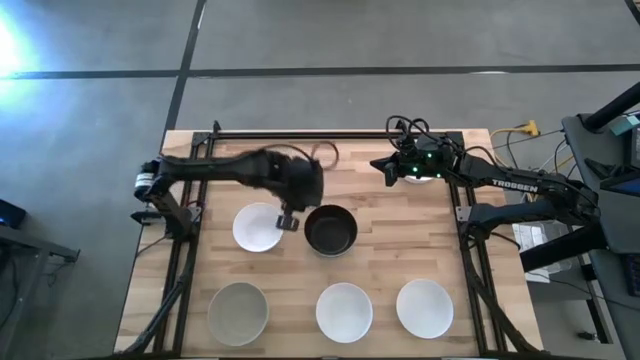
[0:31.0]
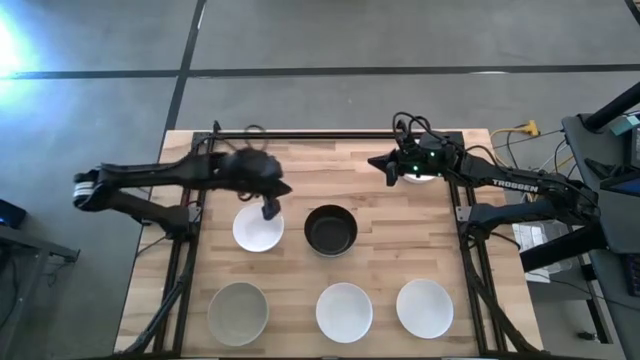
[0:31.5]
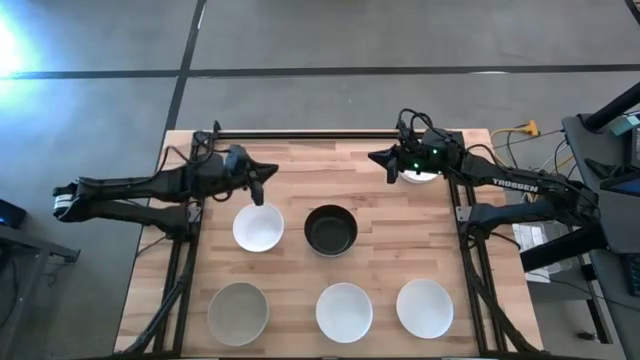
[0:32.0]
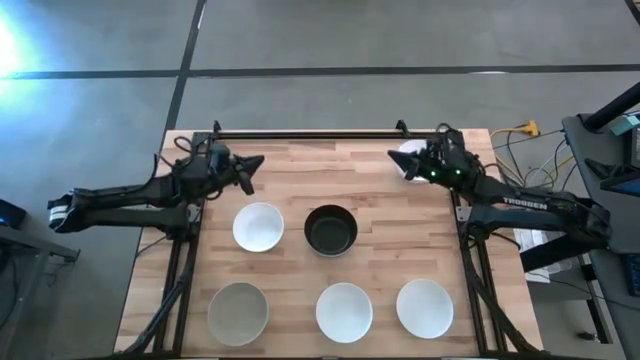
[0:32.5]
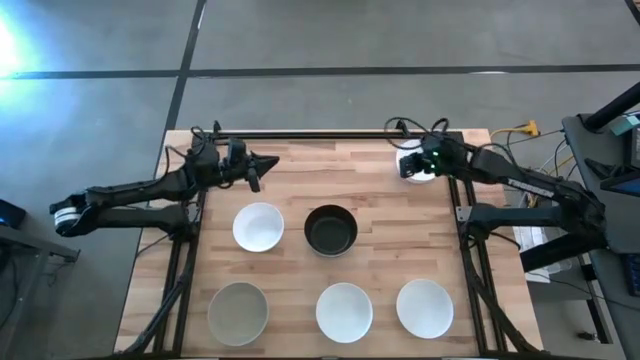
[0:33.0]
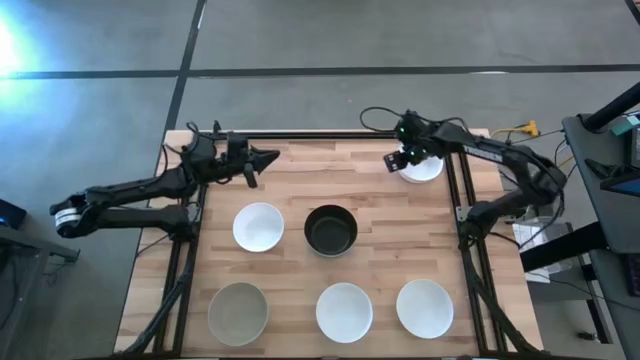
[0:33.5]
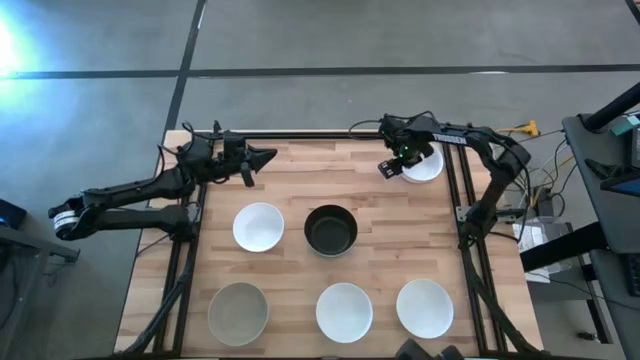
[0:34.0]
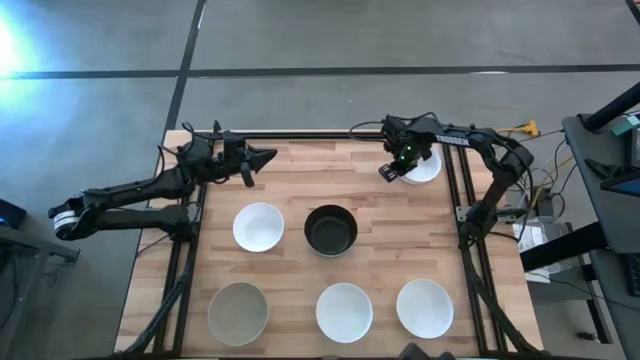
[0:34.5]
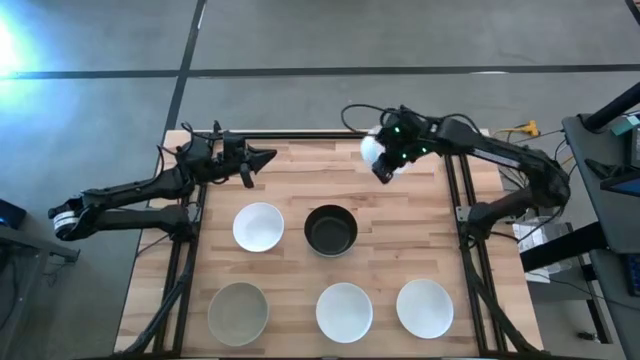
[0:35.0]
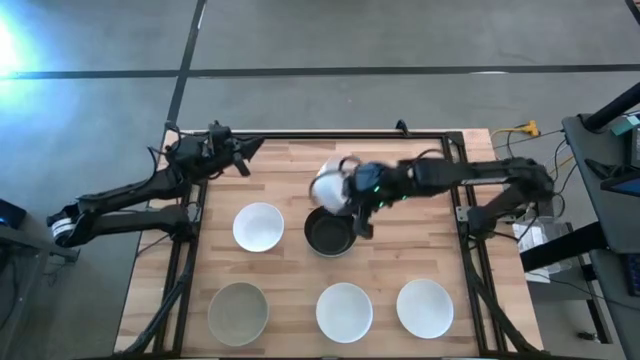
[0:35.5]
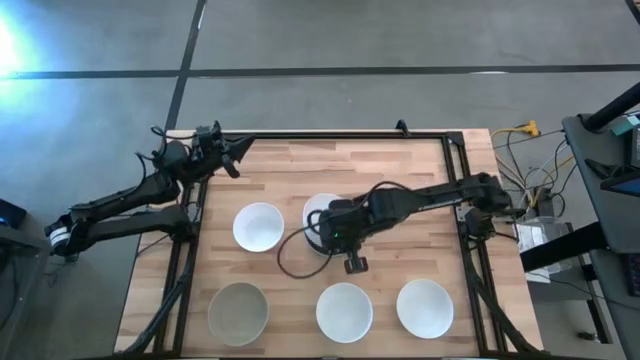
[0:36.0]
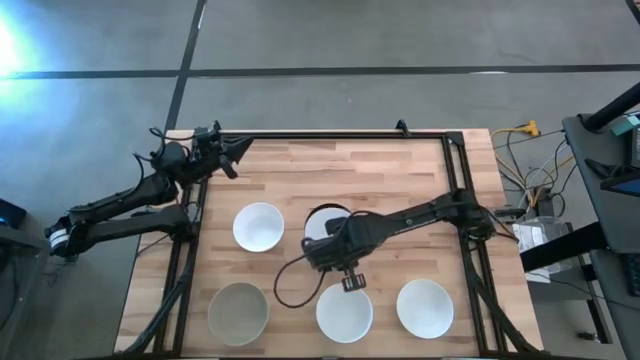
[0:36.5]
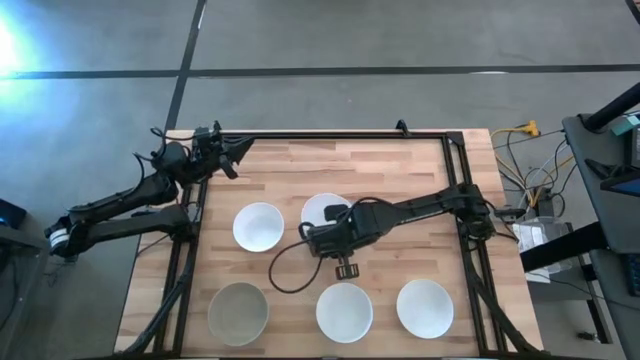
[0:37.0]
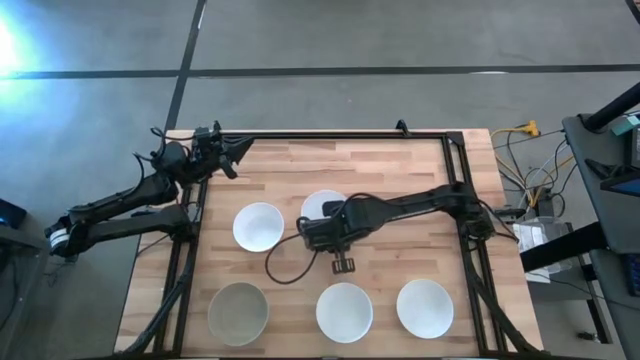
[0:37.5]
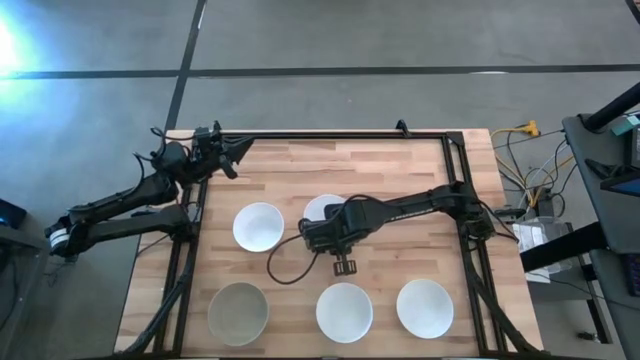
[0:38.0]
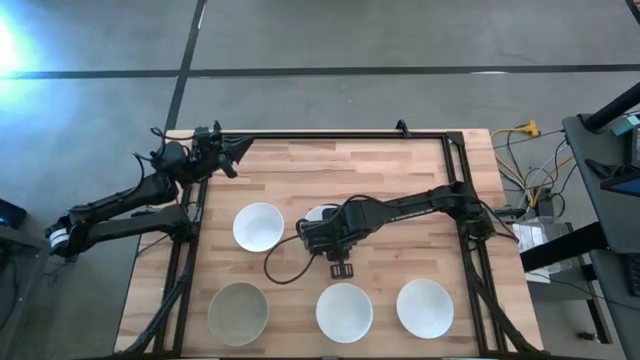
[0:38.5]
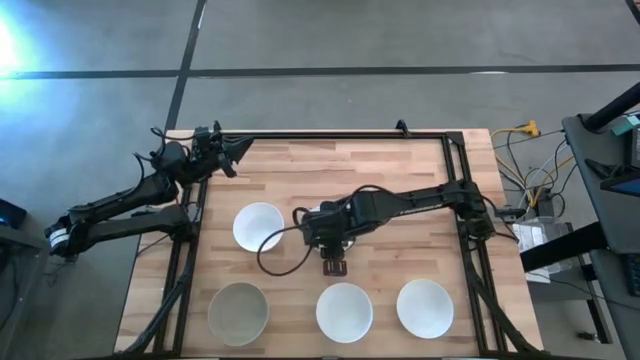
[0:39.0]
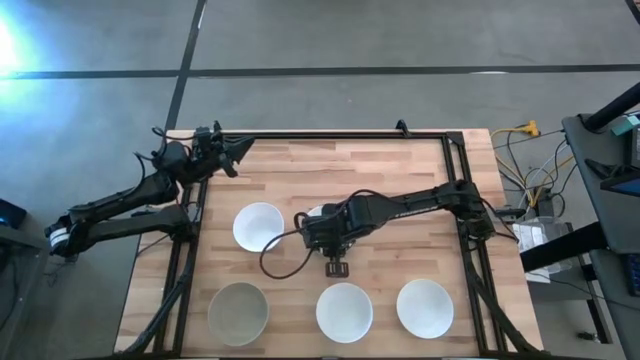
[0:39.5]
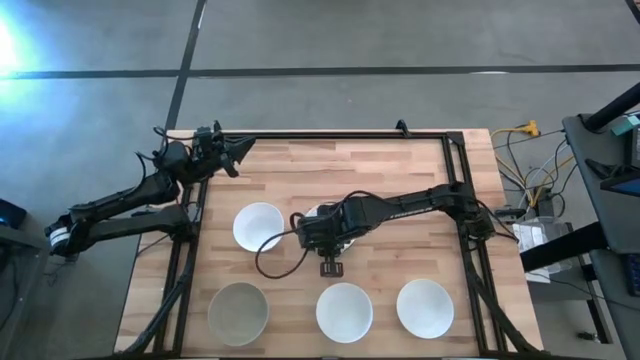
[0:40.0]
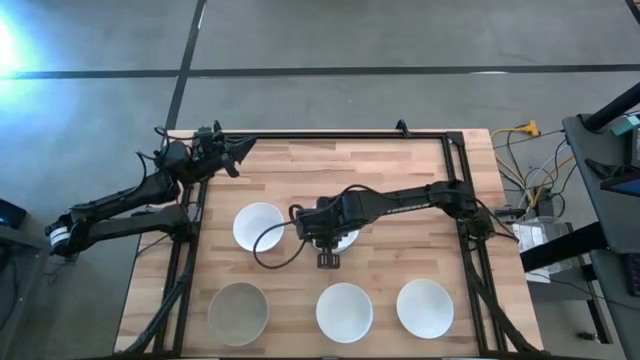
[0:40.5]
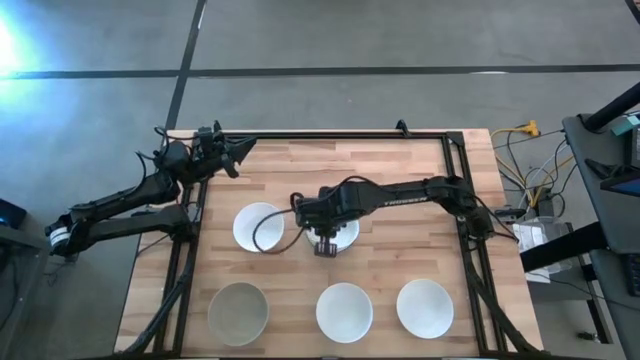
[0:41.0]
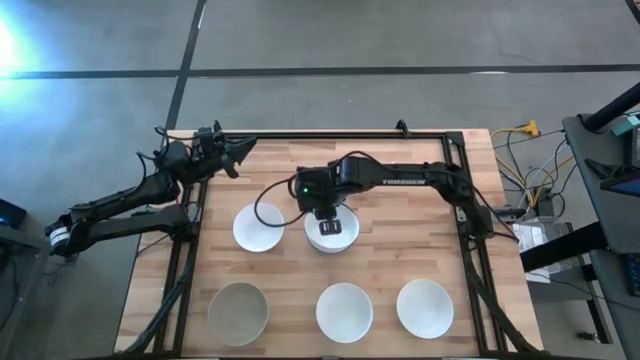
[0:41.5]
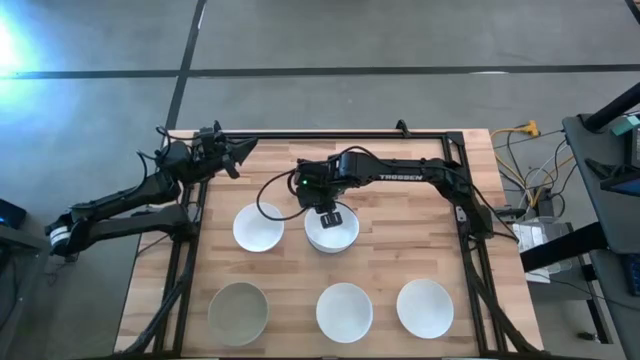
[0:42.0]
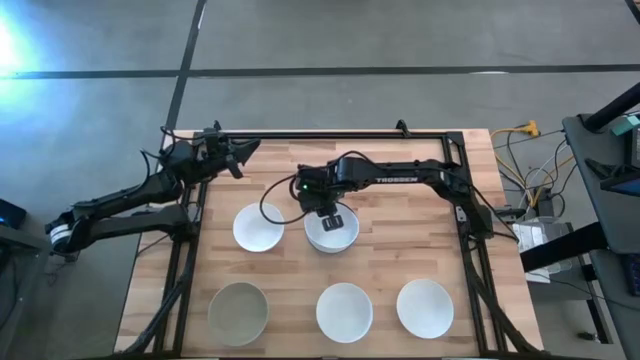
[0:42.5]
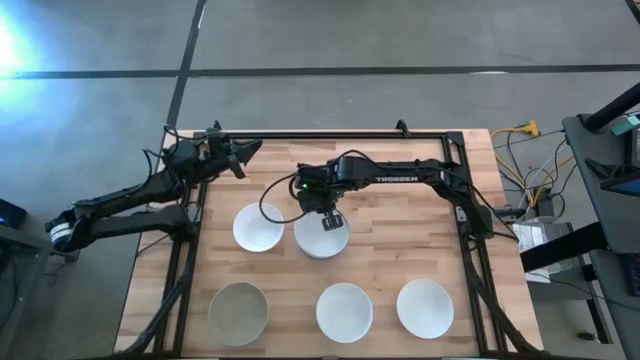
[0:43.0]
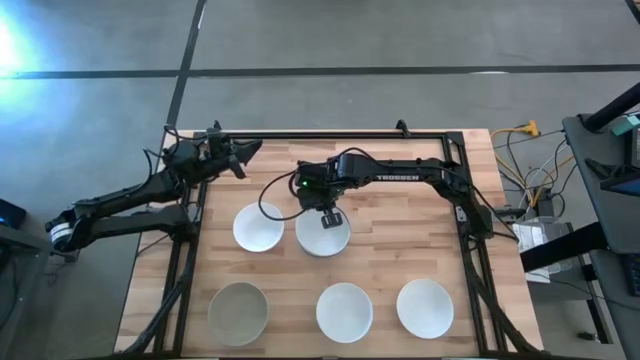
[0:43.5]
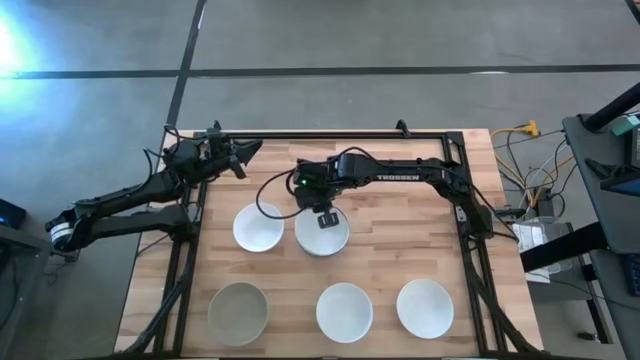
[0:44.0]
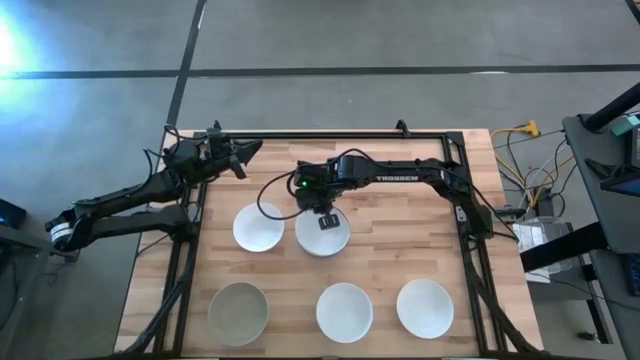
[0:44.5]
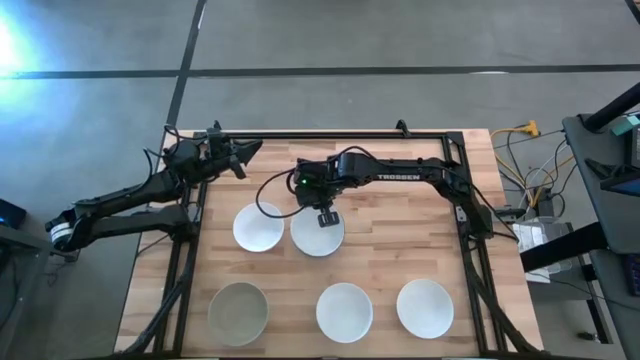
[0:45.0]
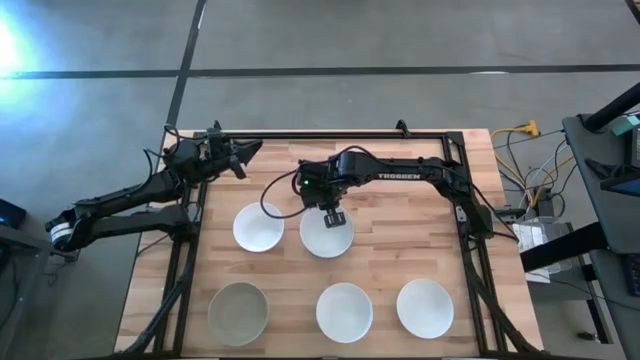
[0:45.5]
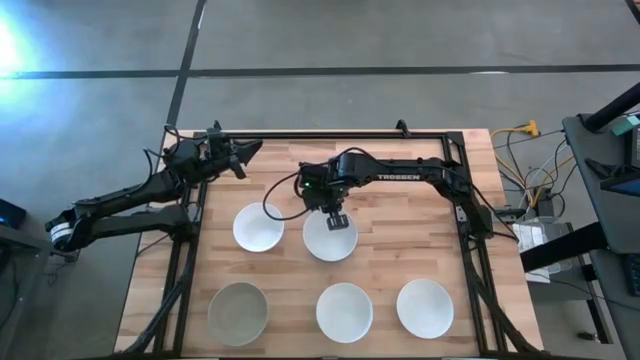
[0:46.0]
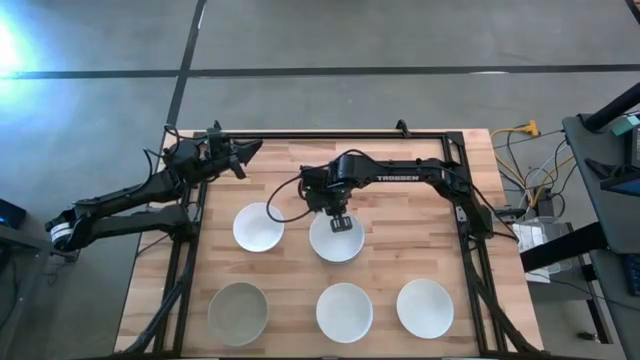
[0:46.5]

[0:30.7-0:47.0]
Task: Nest bowls inside each other
Stack the white bowl on top of the black bowl

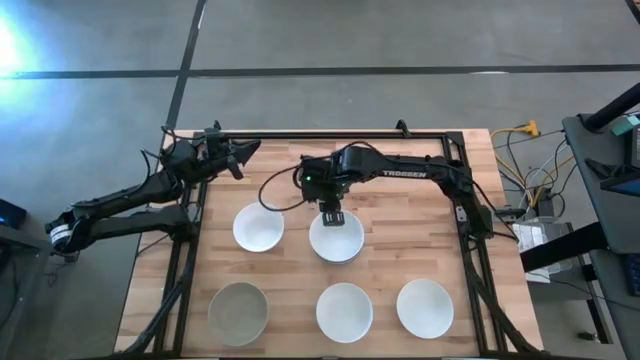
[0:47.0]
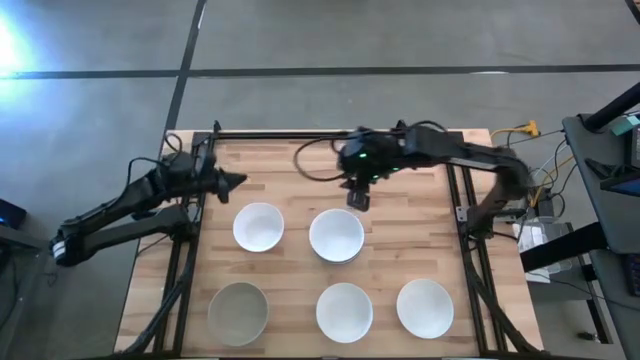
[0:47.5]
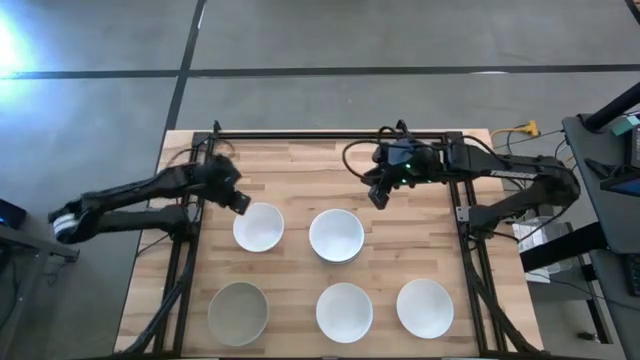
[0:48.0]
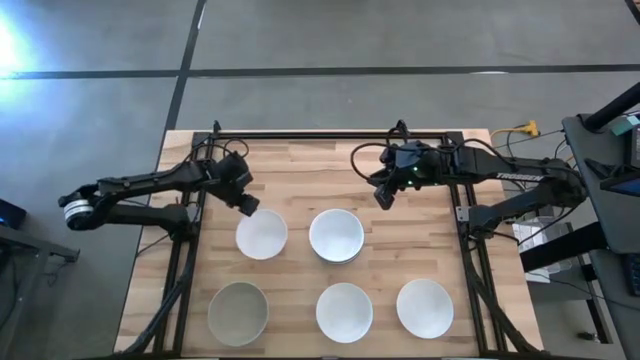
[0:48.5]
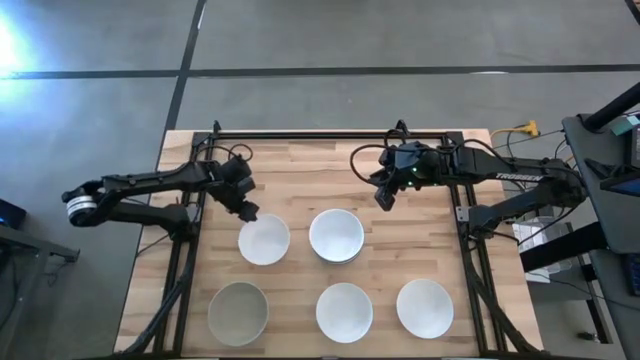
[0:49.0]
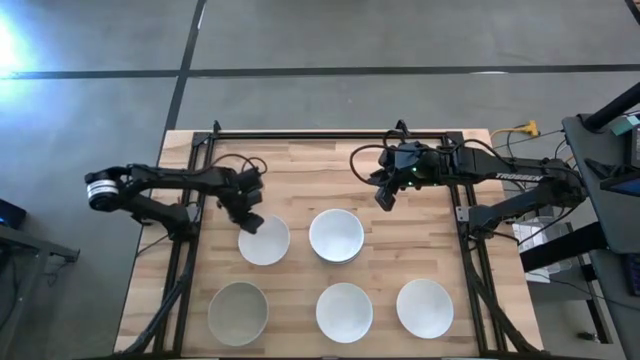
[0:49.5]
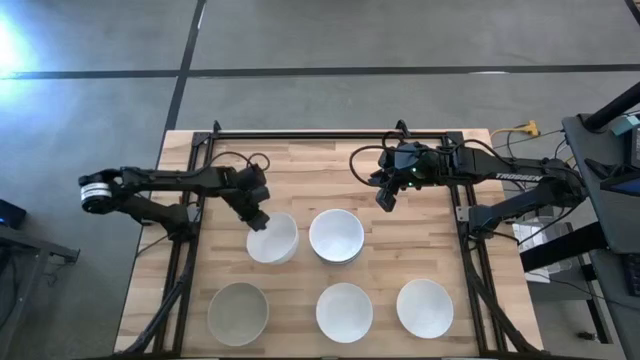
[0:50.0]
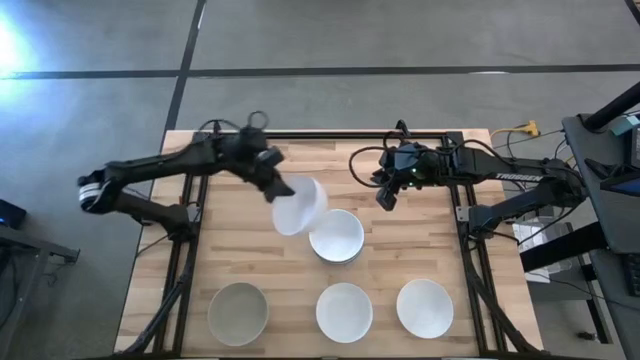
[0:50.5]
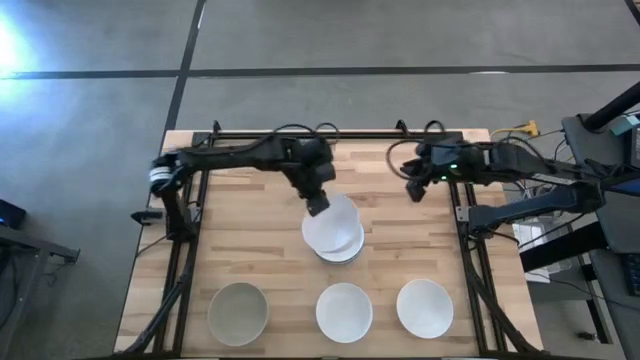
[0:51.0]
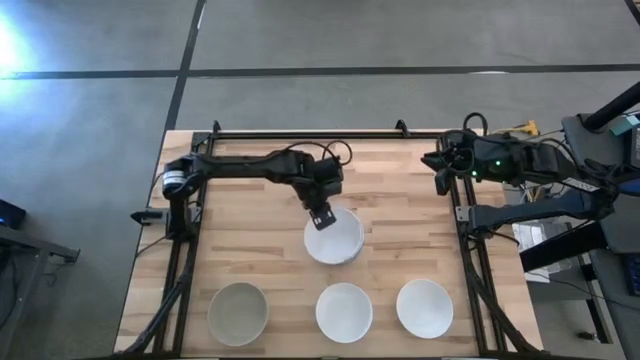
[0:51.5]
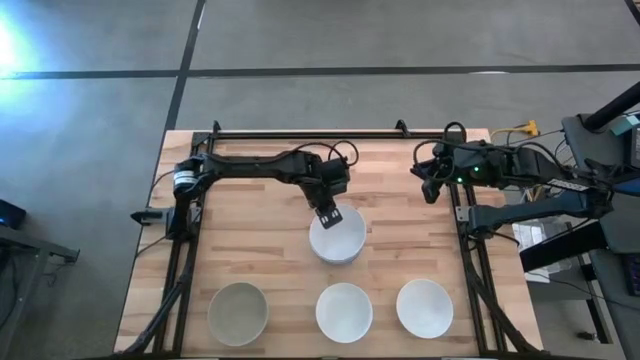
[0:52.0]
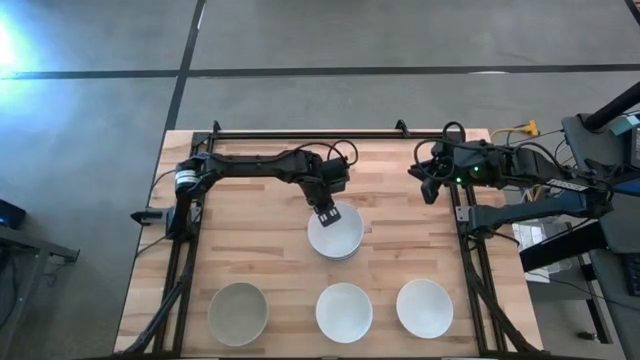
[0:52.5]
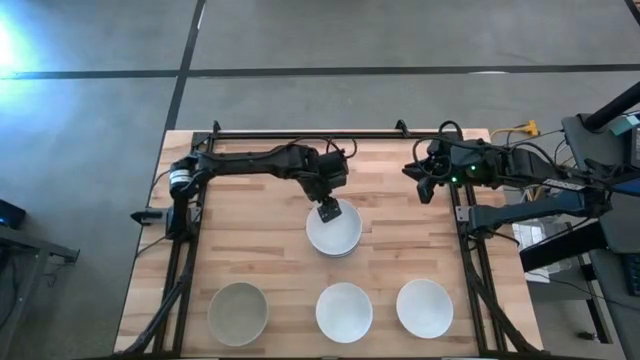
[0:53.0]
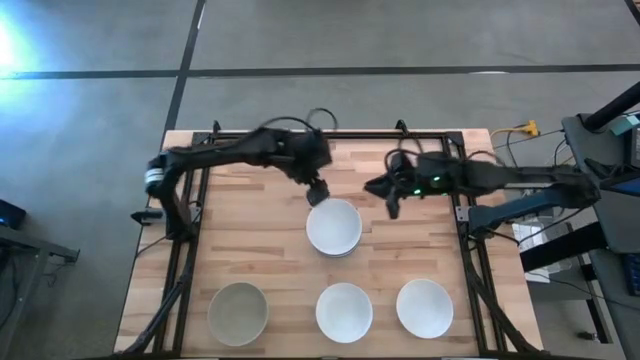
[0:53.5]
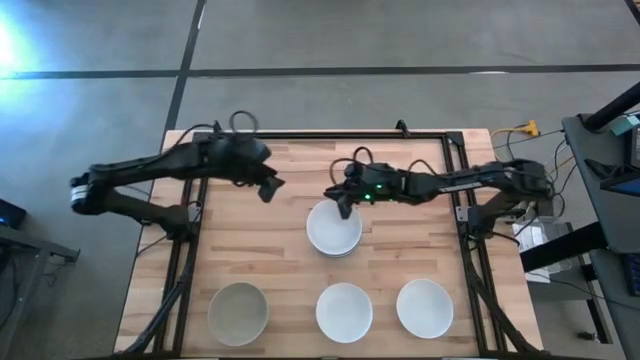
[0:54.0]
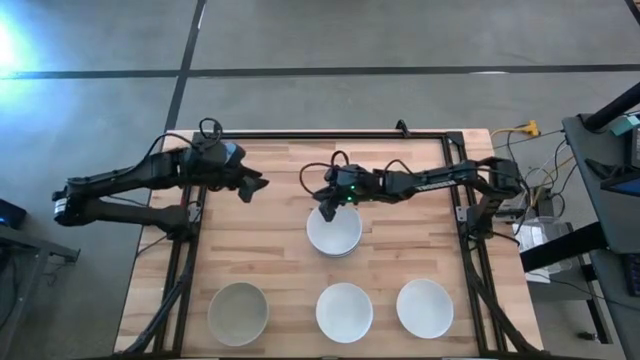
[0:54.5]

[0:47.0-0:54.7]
Stack the white bowl on top of the white bowl
